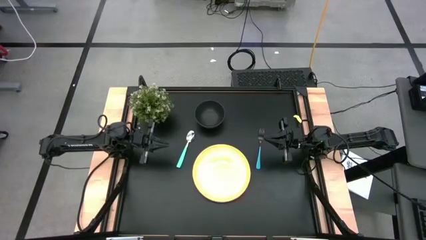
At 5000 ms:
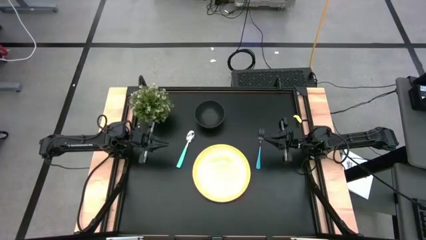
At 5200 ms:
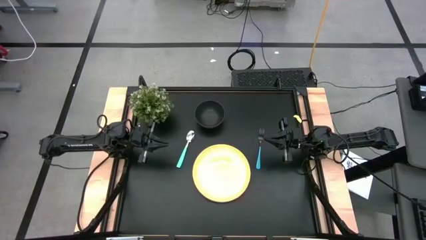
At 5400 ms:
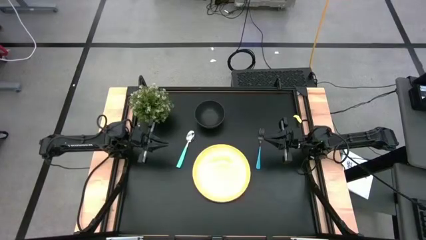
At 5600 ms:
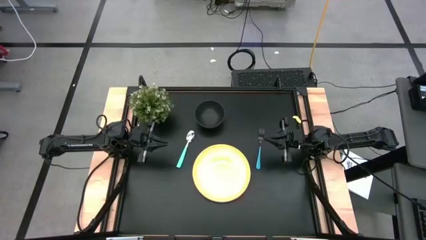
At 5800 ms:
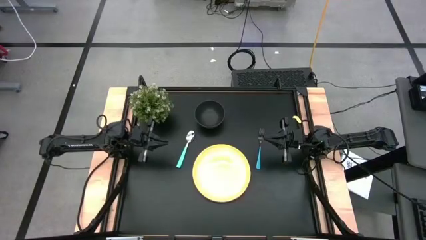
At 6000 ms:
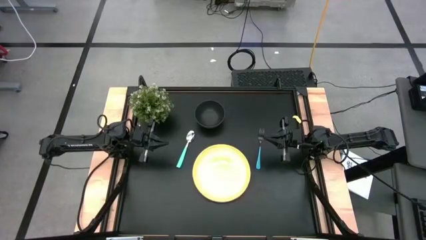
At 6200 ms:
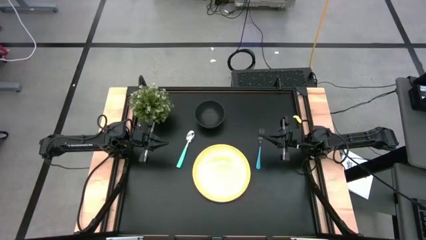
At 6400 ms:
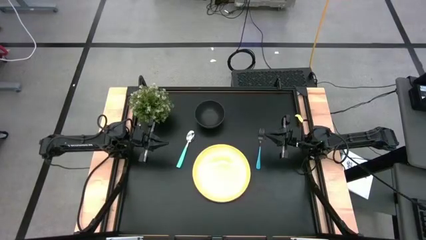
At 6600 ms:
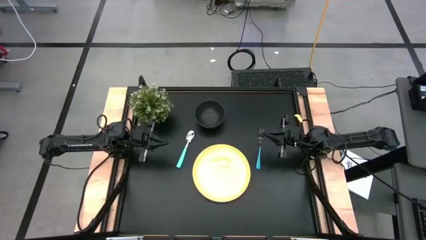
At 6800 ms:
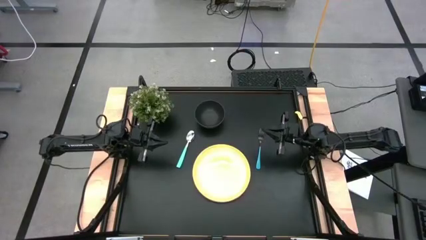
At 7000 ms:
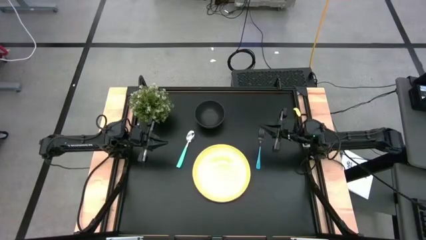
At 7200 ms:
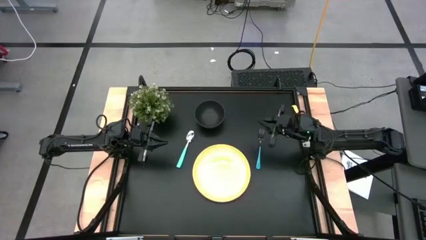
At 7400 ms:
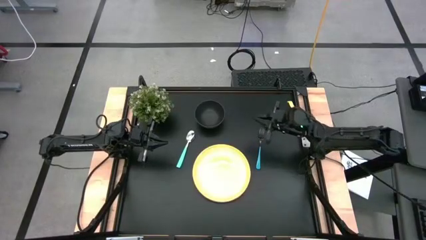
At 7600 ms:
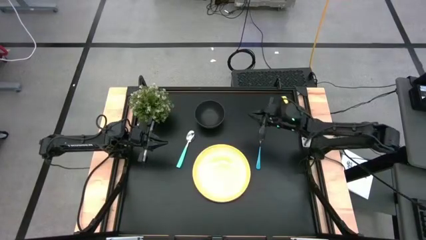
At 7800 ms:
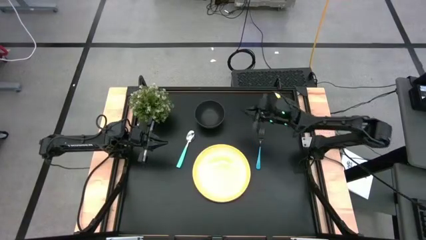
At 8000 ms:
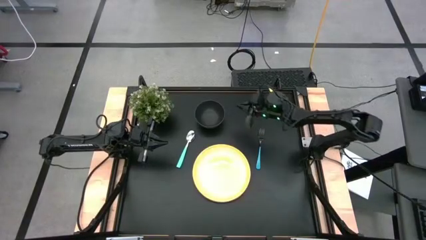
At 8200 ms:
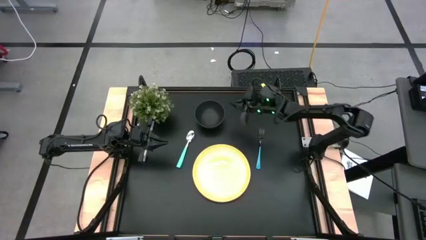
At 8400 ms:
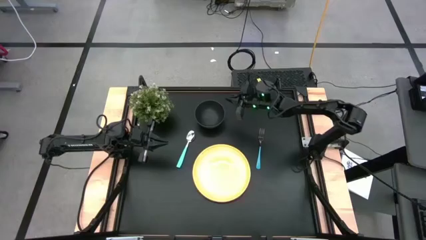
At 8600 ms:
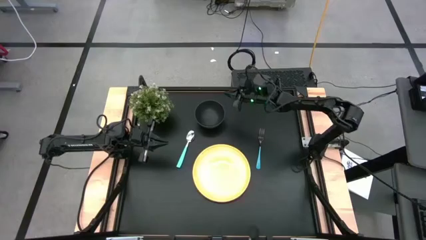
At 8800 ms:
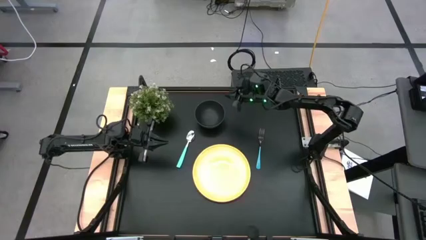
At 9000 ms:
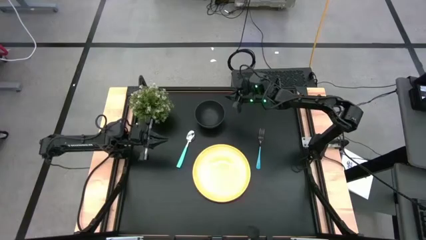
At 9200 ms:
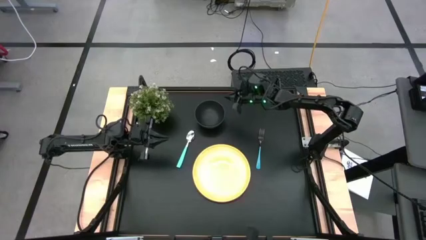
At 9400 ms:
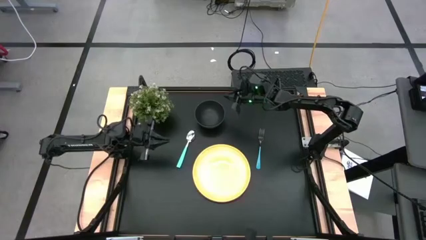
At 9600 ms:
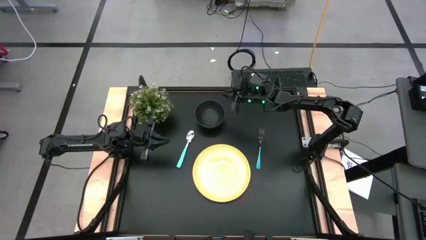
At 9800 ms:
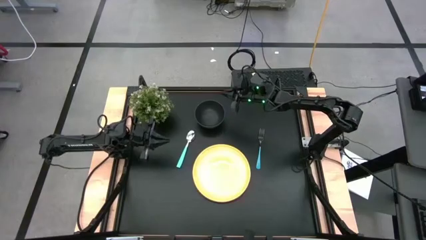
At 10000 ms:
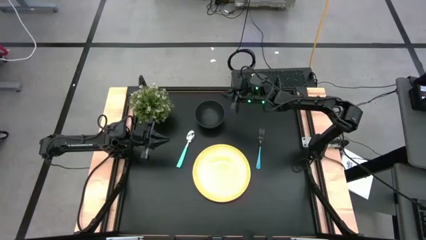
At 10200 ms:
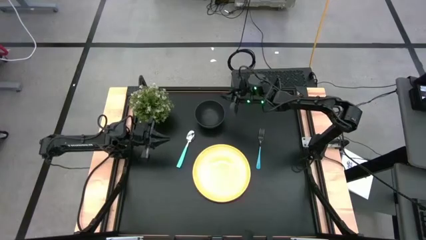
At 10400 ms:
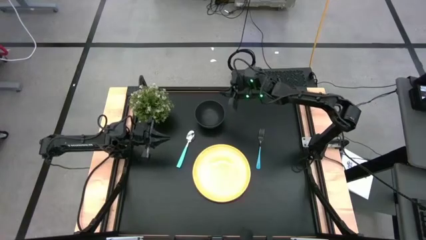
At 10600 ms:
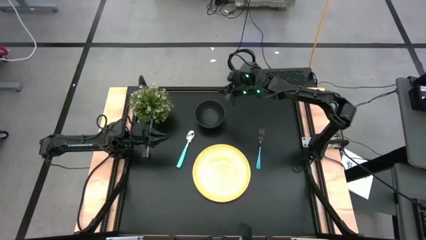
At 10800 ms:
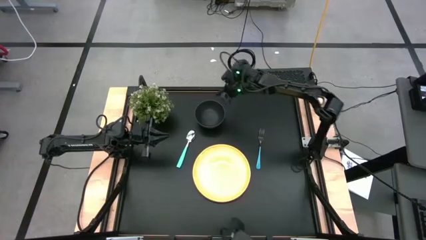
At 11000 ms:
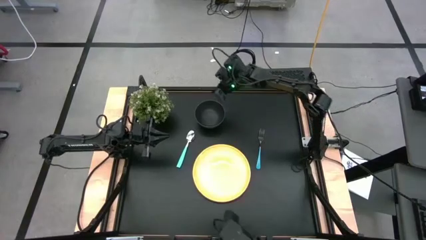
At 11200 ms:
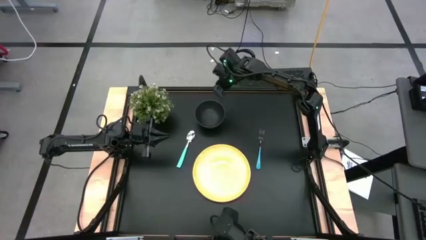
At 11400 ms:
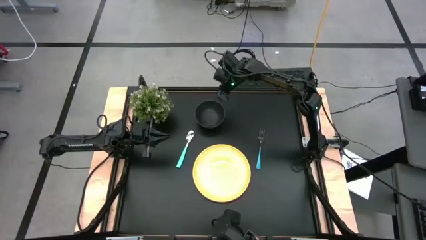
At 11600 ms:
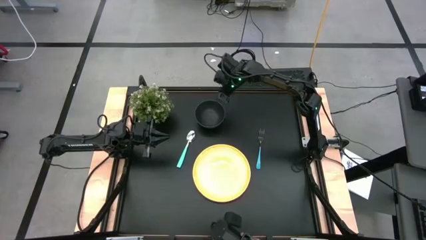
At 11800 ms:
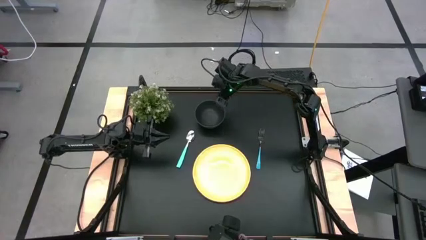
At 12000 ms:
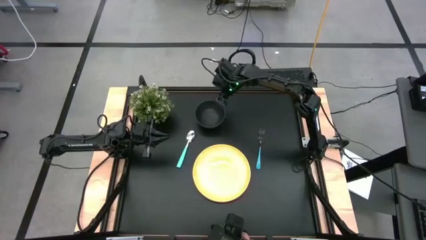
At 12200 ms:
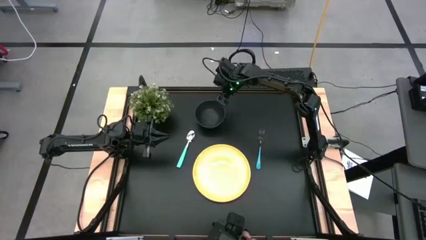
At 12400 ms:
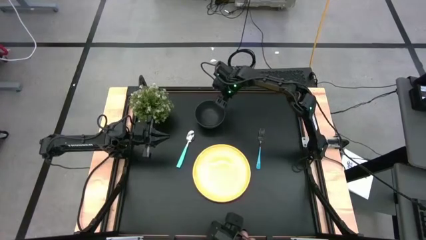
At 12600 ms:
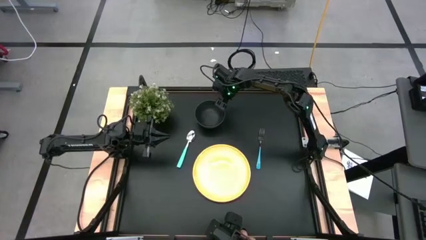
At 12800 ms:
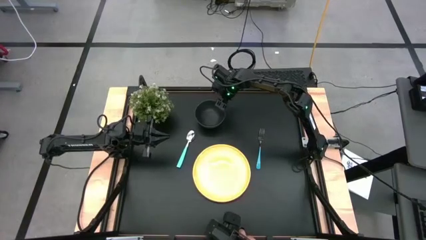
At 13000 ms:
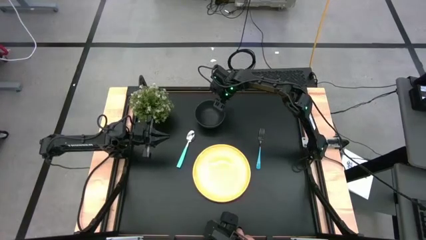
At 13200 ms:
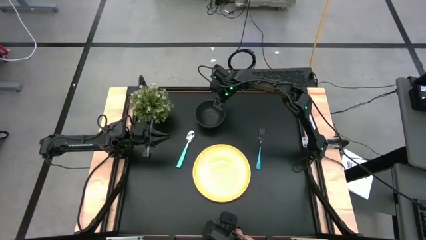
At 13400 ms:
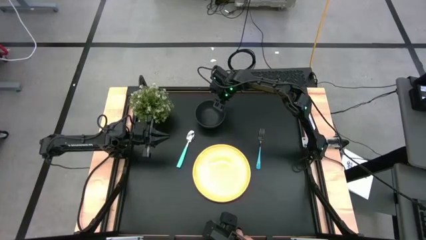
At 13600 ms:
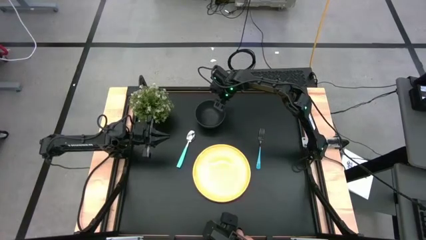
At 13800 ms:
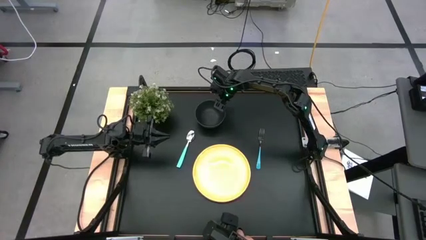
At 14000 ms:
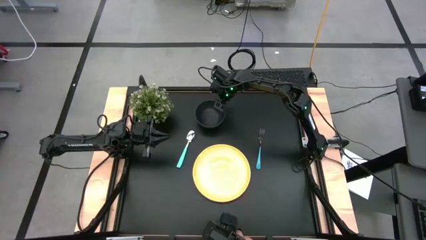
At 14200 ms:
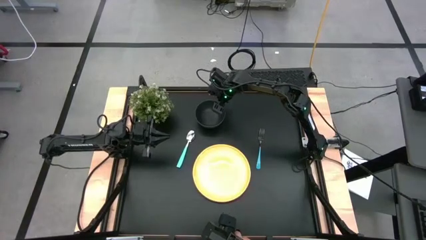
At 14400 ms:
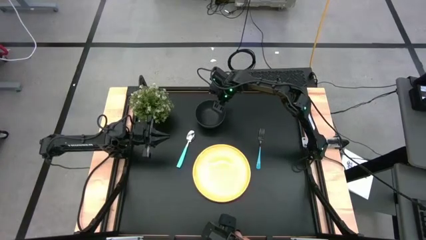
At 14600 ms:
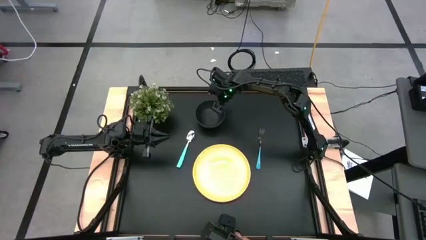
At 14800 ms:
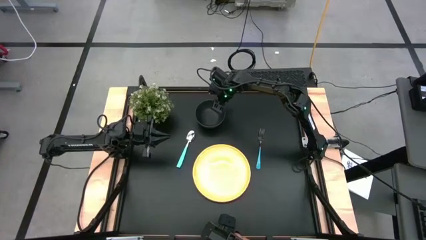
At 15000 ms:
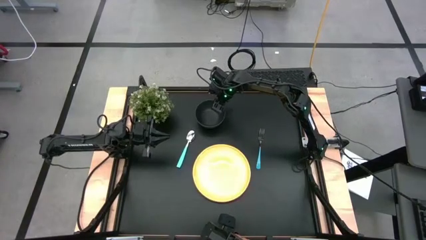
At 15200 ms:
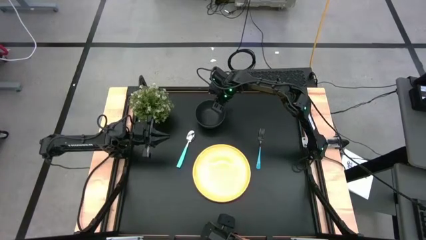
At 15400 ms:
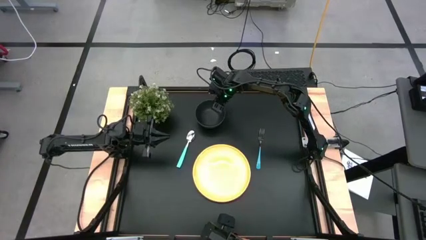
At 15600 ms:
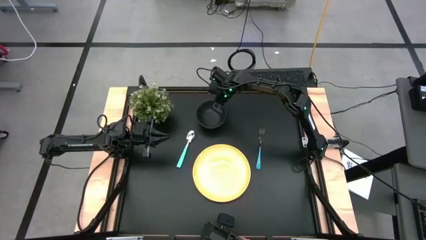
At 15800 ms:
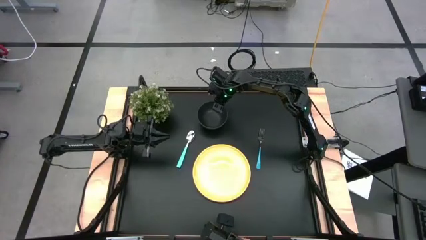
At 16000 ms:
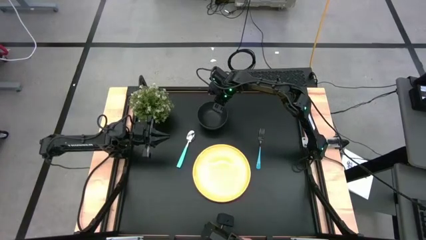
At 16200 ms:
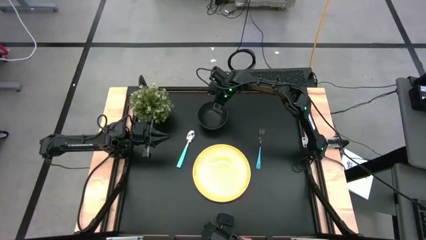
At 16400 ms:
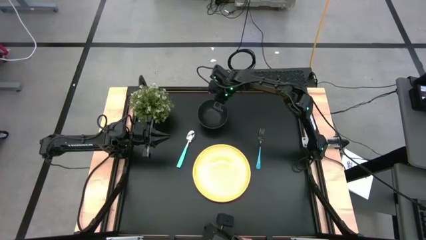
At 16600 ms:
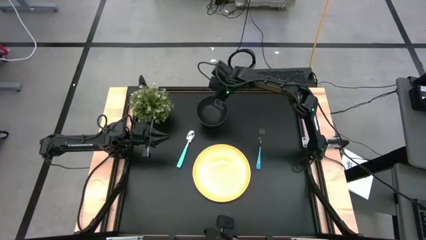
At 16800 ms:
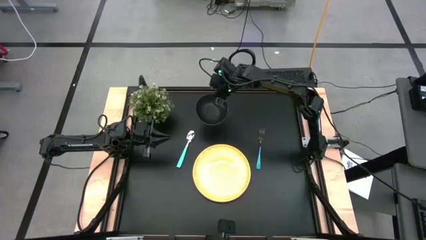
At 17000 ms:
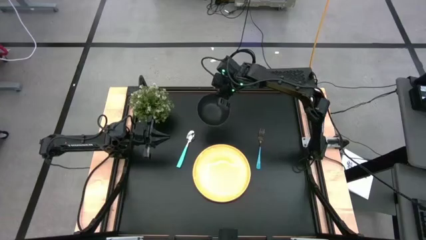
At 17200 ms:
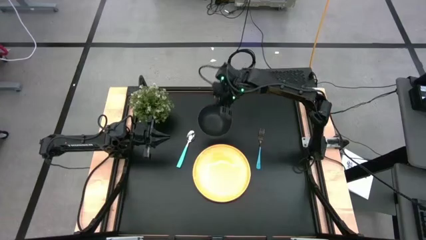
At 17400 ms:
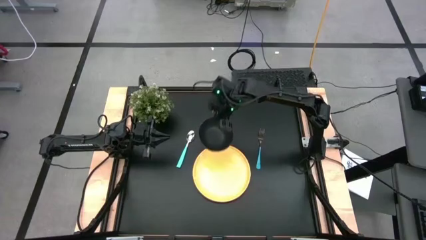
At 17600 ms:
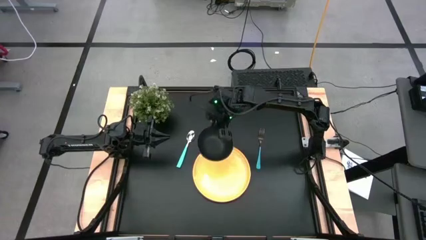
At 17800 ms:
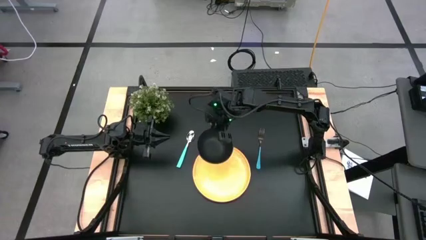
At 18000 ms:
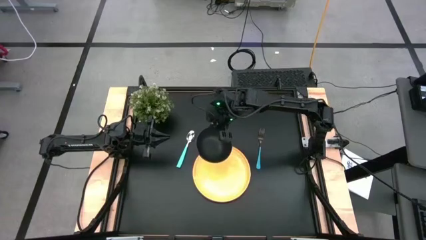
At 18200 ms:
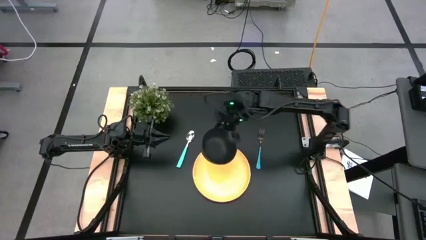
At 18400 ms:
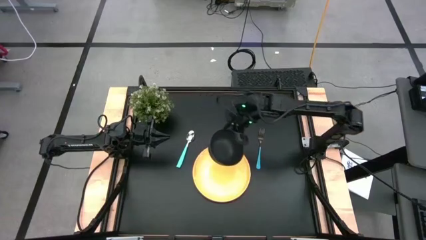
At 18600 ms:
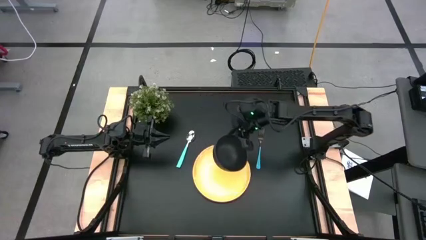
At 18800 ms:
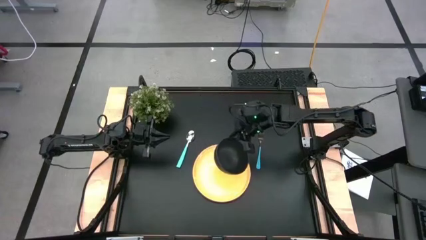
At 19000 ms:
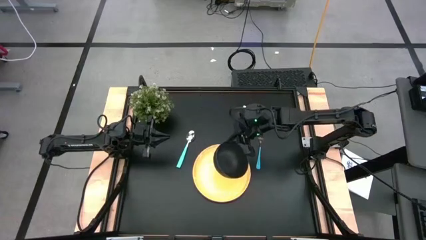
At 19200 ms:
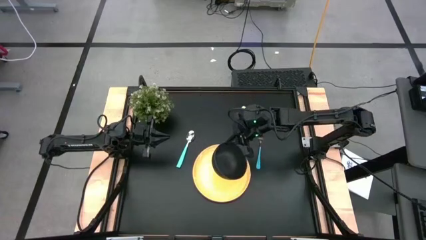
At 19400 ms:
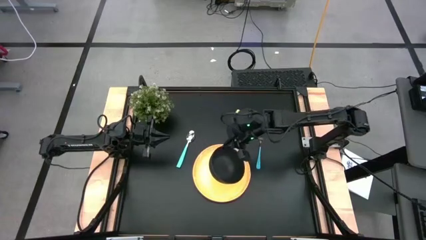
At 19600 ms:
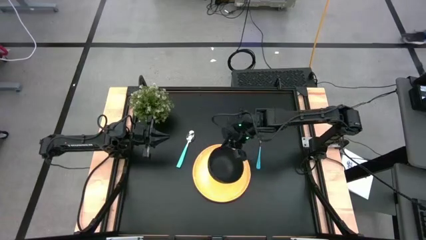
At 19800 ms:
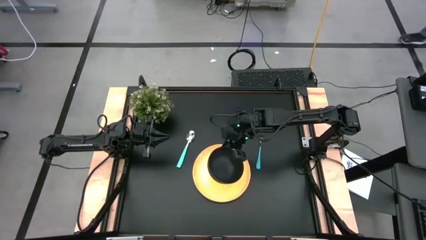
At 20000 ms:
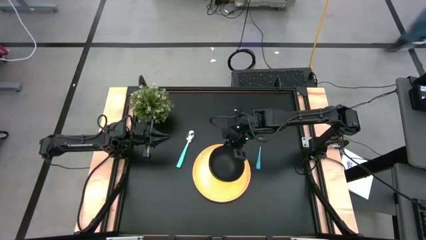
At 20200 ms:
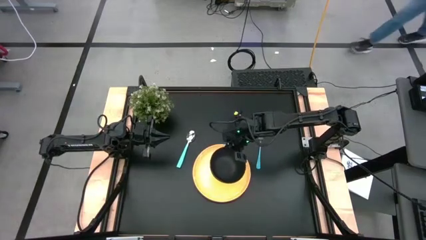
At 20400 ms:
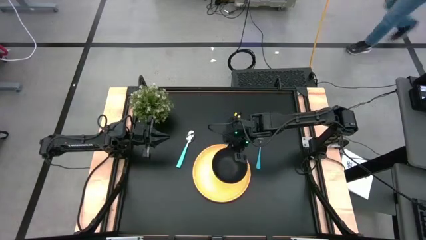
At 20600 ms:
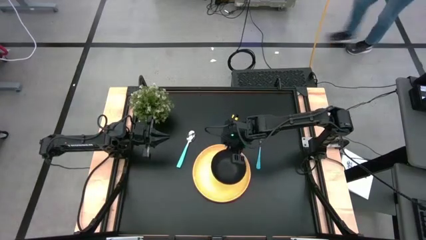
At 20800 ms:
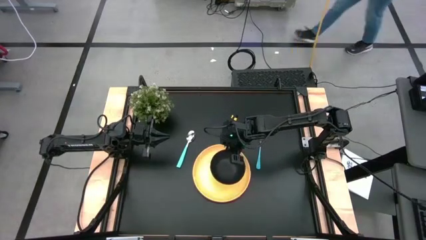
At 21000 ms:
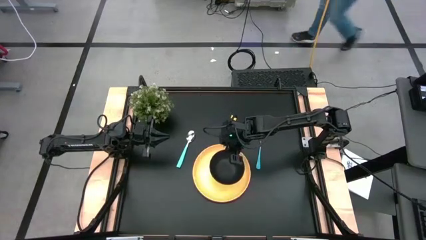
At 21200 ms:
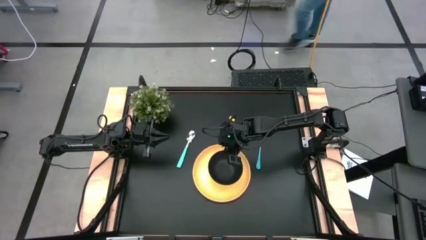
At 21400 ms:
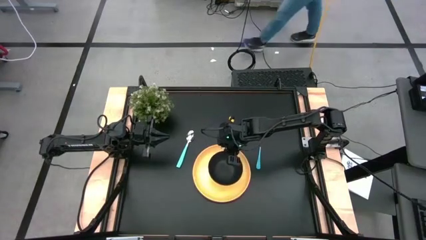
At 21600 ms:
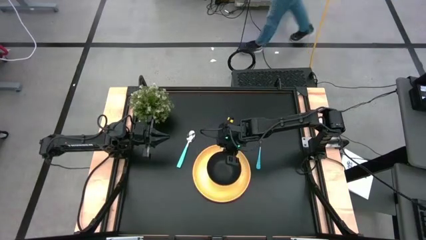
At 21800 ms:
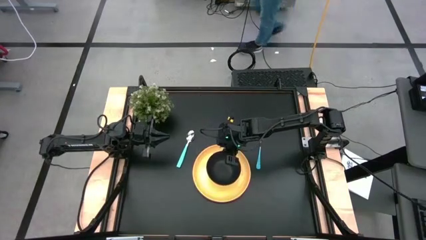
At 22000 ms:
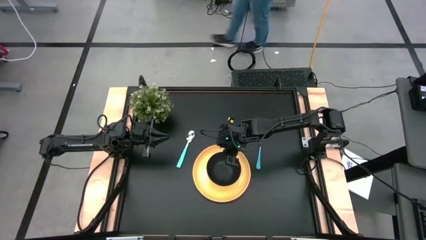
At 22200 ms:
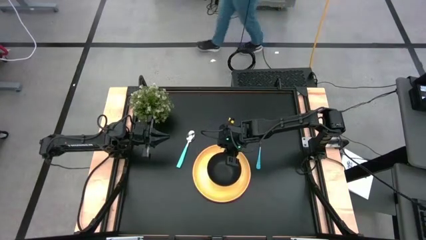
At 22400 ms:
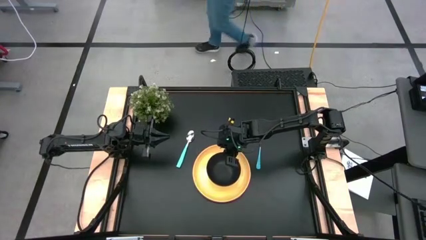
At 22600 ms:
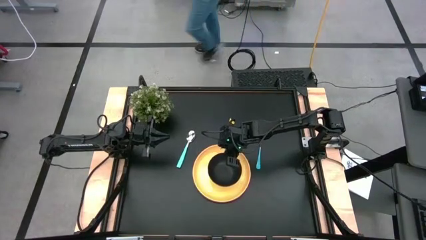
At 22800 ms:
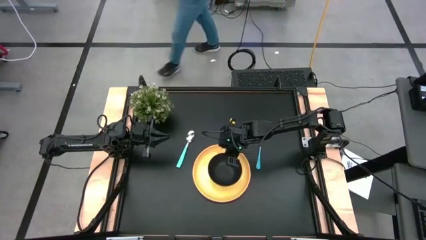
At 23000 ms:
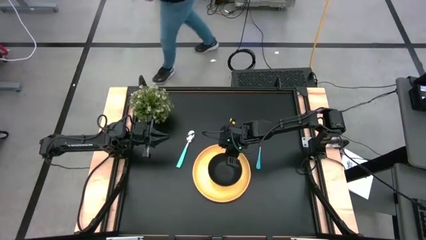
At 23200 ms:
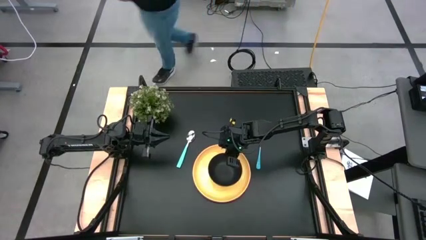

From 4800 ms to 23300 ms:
Task: Set table place
Put the black bowl on the yellow plate
